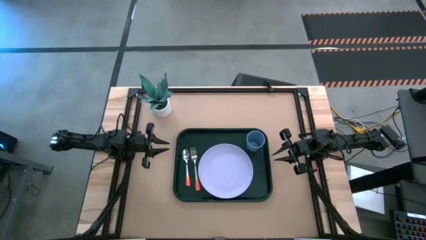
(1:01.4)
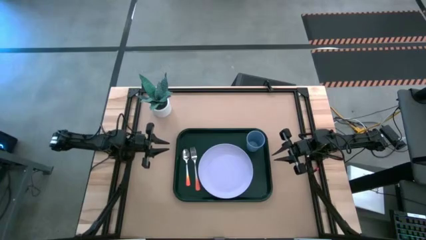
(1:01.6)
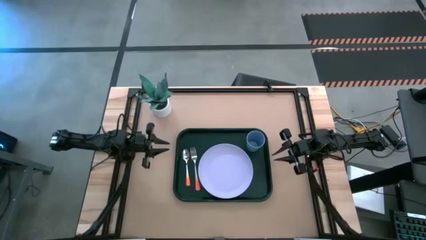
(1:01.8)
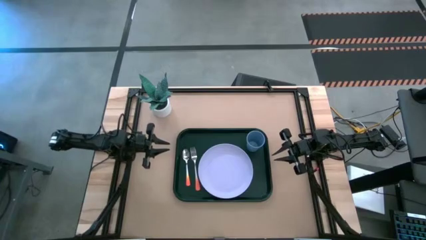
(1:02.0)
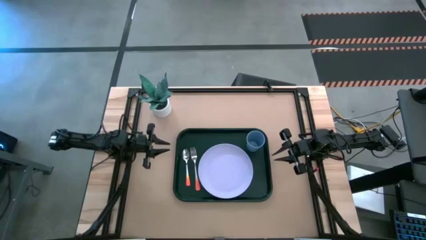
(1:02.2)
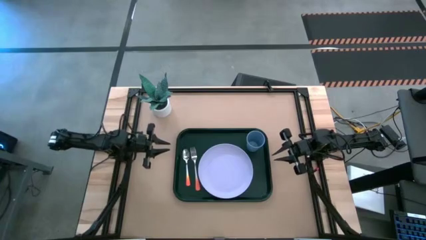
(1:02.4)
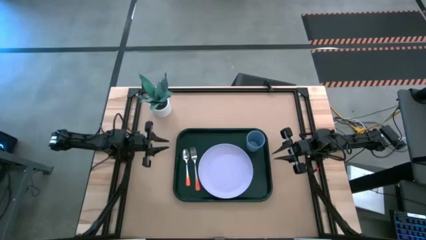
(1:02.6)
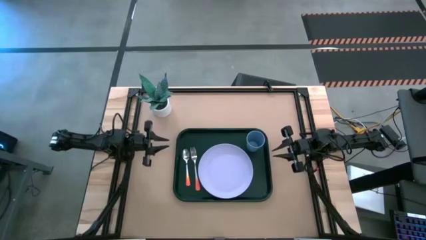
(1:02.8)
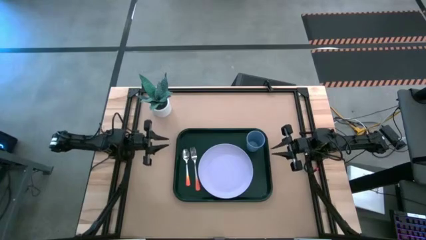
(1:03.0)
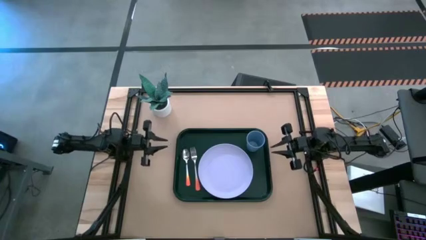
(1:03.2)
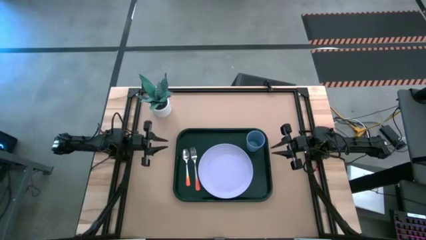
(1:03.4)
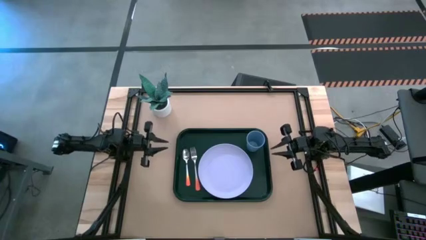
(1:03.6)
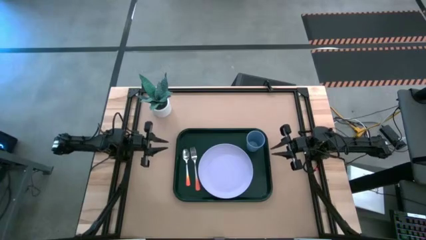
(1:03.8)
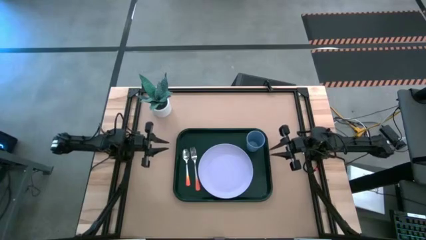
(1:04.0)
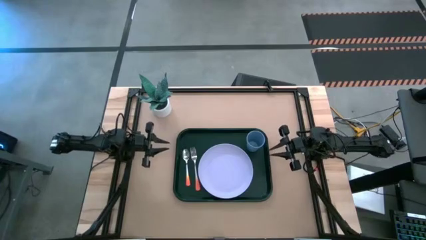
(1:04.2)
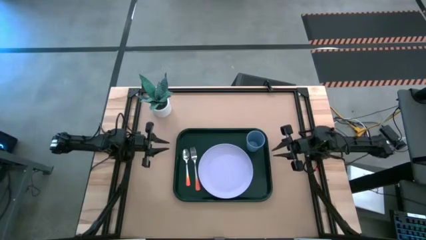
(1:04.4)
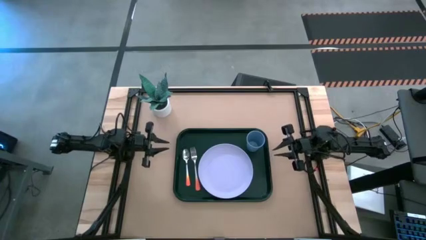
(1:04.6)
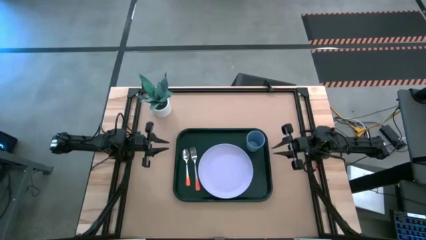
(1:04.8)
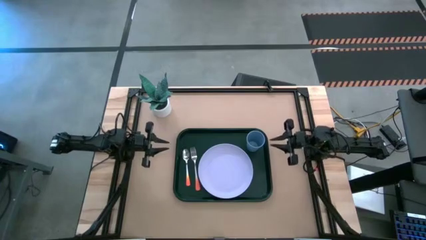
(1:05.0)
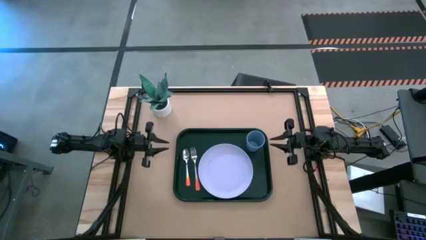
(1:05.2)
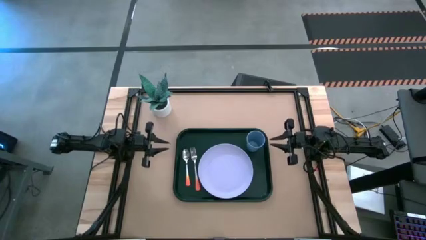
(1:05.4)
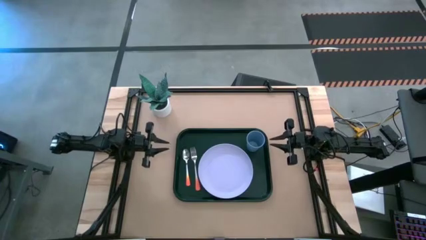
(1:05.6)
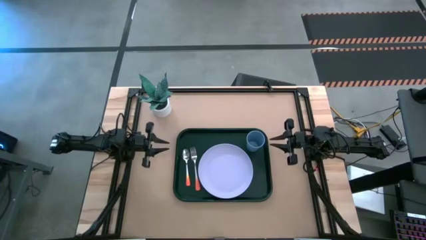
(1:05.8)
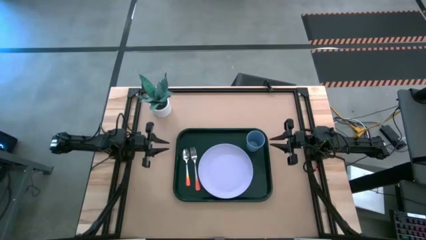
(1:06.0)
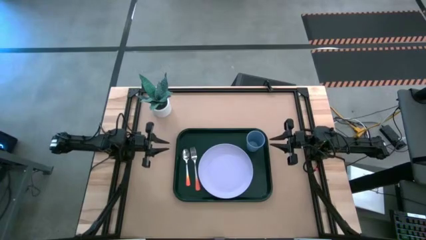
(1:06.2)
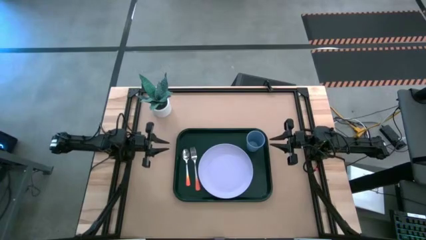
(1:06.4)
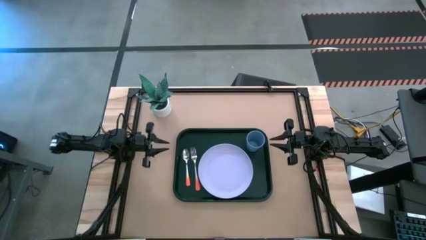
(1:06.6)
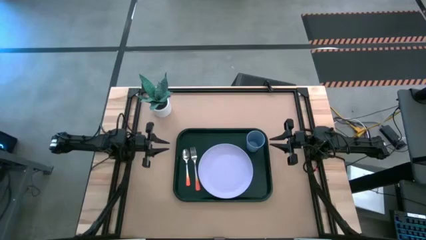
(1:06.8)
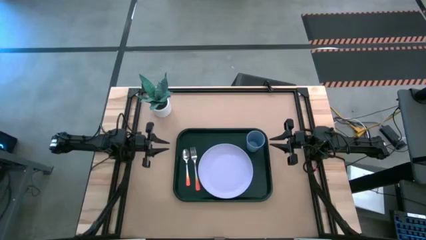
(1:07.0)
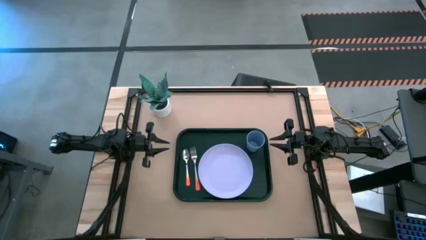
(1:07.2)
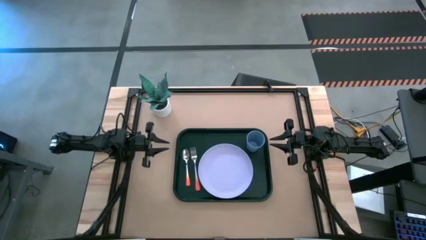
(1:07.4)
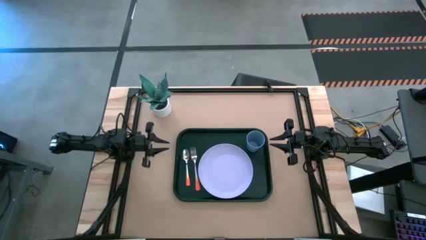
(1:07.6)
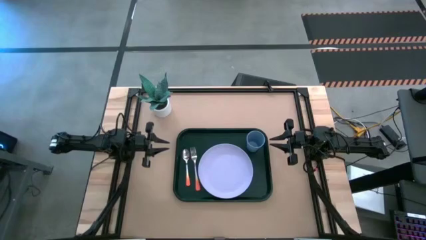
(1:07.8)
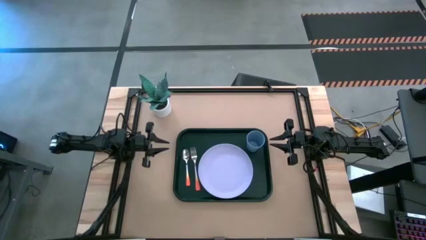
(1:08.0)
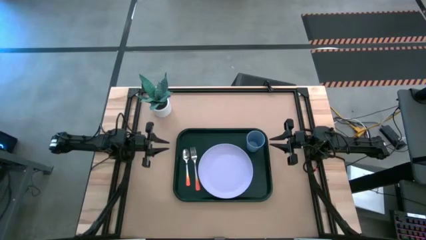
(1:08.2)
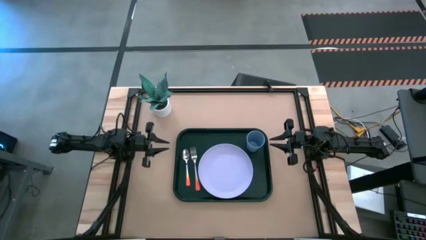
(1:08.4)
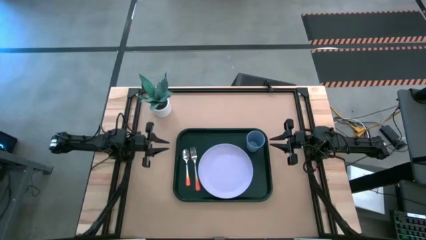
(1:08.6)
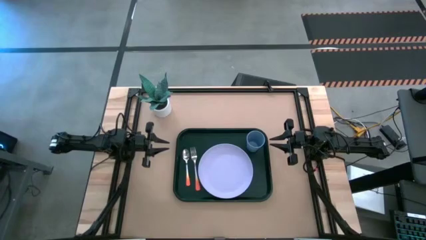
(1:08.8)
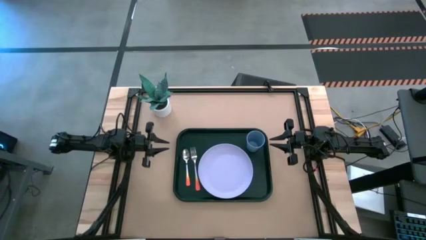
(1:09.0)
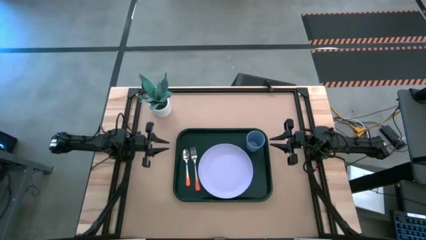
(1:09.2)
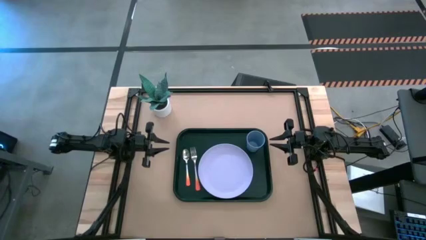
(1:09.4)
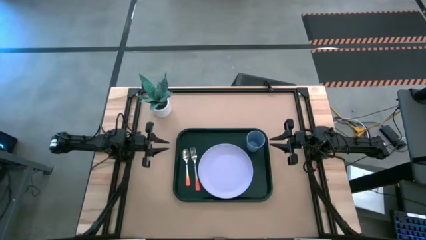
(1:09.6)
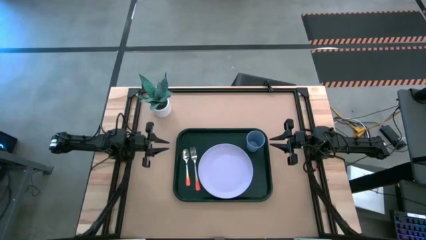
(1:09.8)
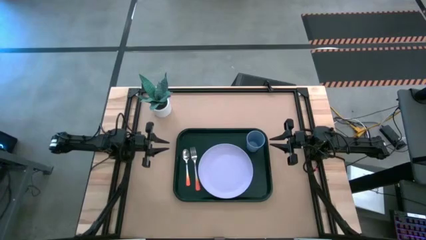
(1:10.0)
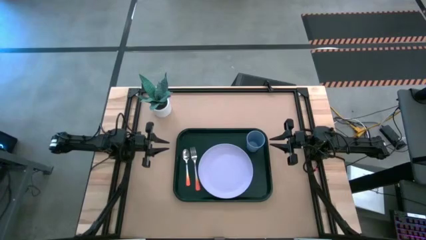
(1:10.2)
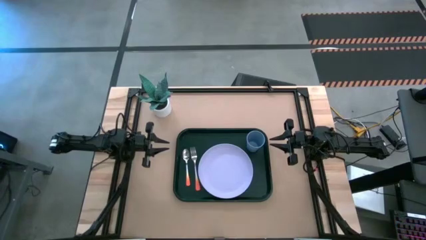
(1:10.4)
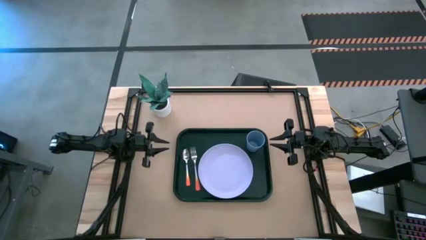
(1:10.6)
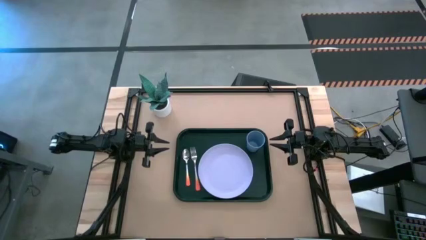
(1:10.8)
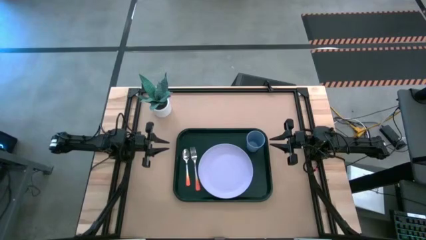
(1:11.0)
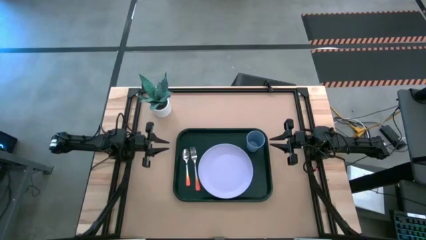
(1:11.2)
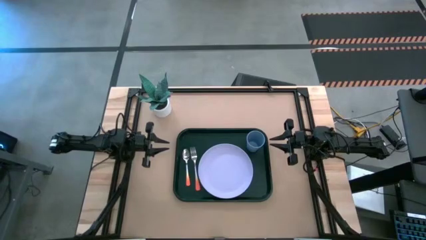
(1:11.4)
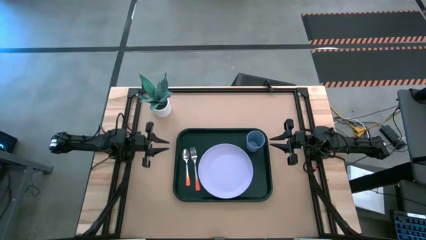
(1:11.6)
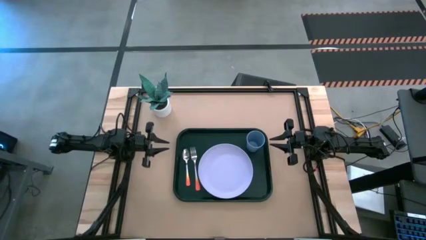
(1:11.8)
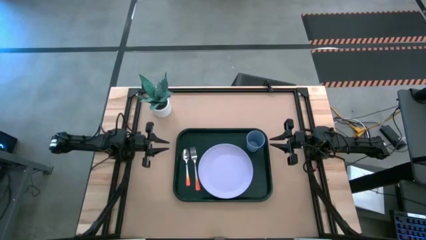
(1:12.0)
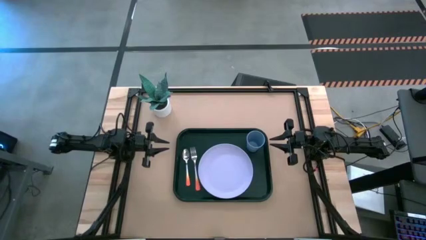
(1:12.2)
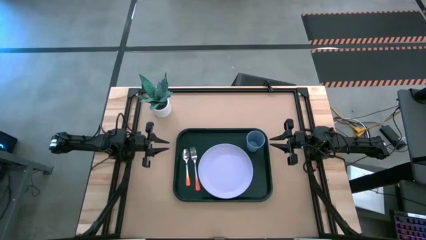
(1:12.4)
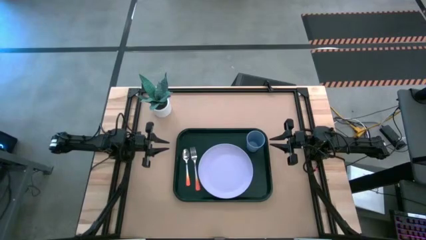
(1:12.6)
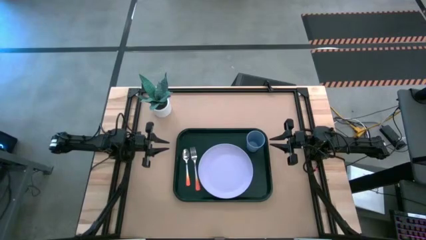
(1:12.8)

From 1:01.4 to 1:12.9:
Task: Pick and place plate/cup/fork/spoon on tray
Return to Home Position

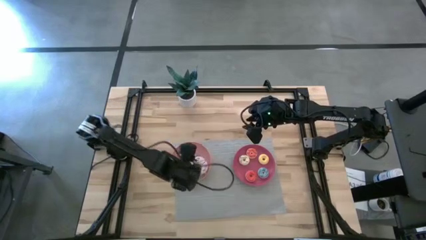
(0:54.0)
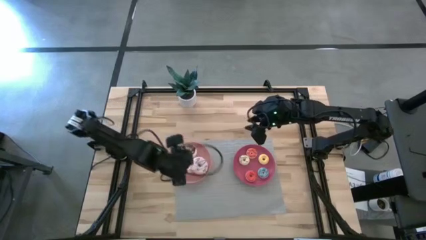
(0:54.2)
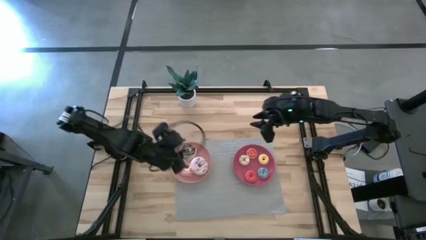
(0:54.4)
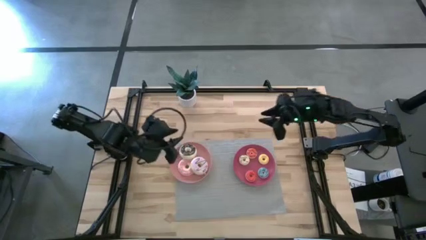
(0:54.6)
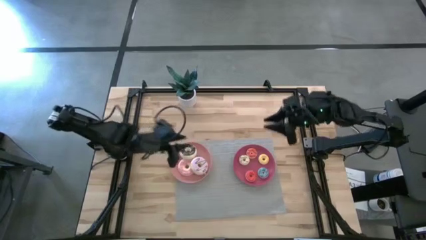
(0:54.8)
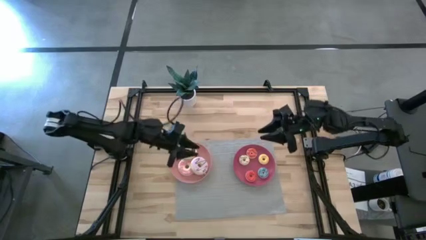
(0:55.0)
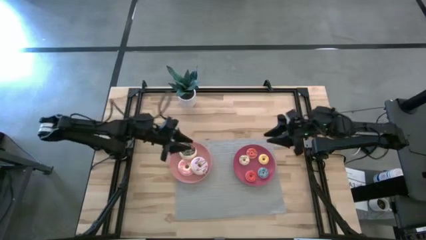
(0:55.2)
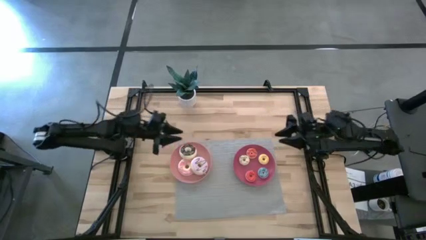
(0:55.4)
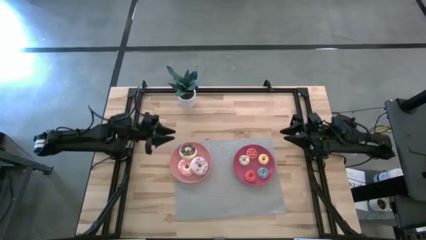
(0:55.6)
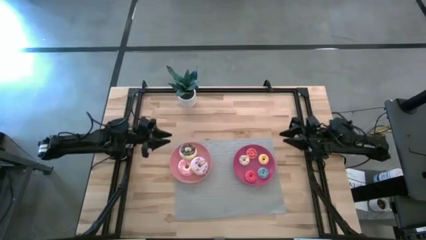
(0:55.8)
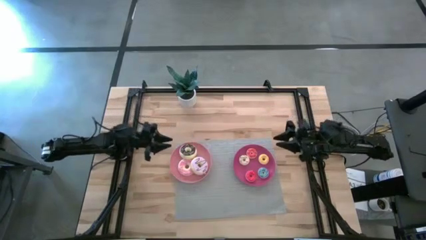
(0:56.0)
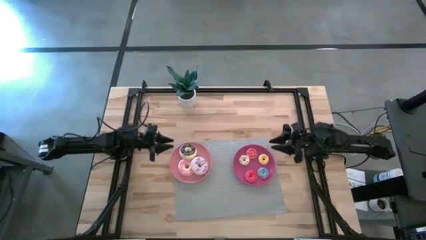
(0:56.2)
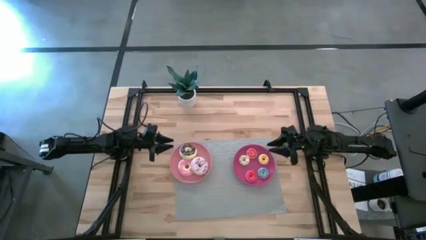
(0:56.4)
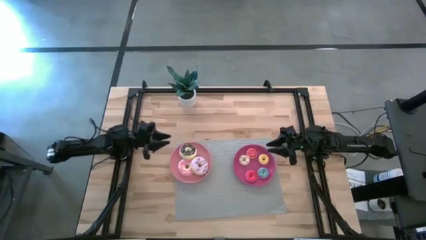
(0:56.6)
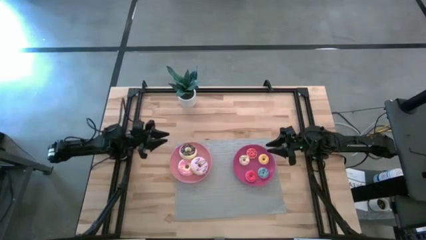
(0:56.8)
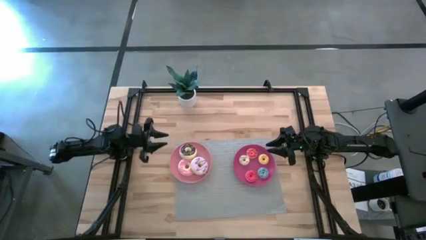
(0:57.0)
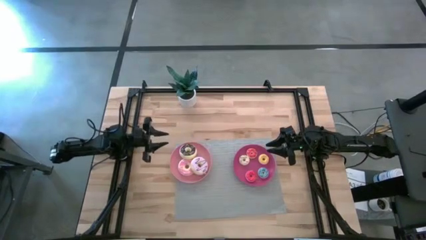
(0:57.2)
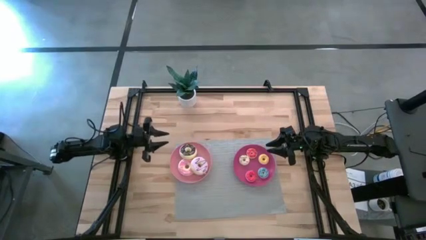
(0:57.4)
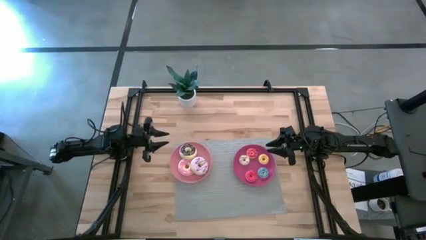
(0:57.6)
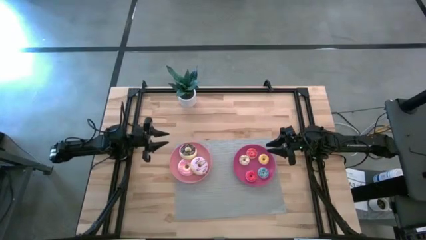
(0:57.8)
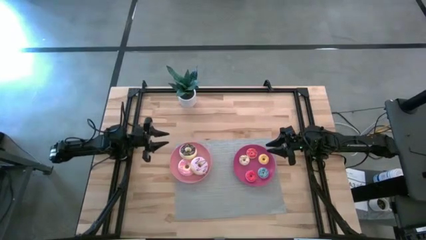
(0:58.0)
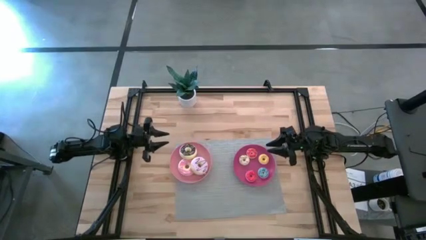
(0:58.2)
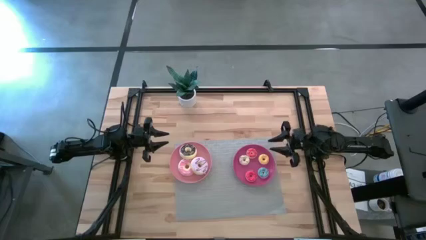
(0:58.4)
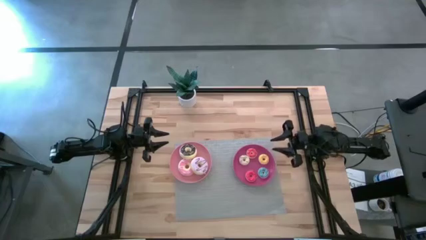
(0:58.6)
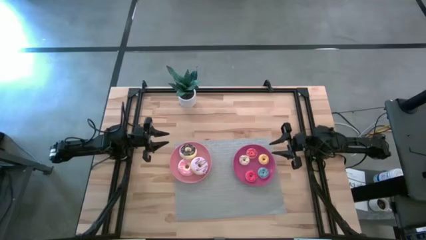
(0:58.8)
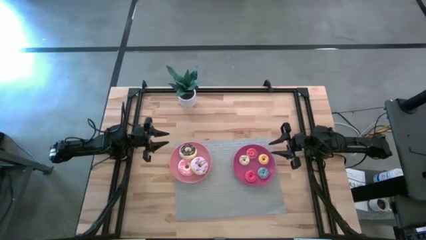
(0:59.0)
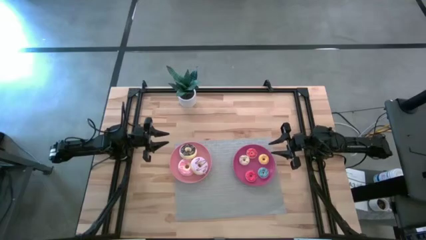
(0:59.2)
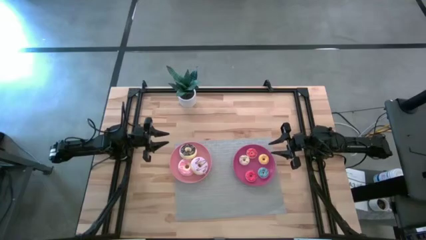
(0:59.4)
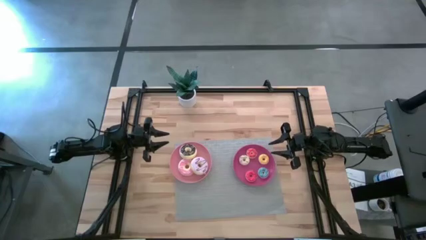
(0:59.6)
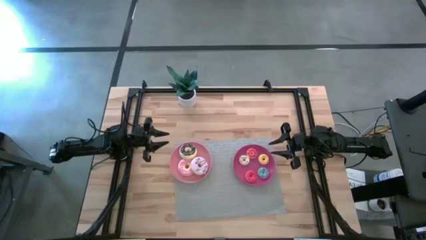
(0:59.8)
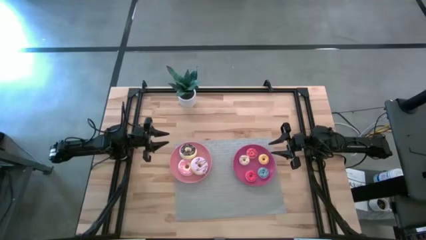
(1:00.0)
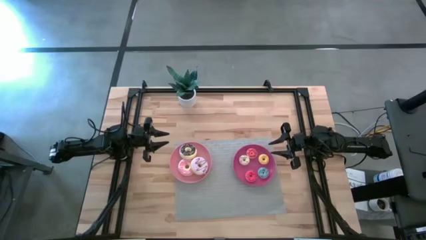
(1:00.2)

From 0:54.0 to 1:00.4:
Task: Pick & Place donuts
Return to home position
